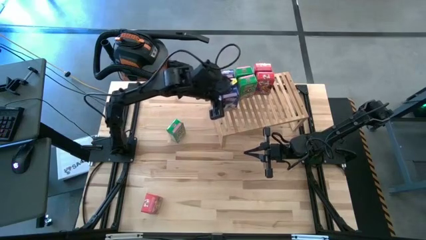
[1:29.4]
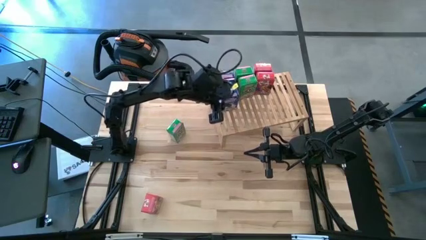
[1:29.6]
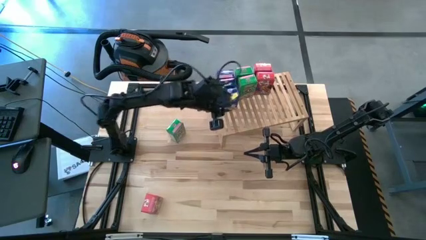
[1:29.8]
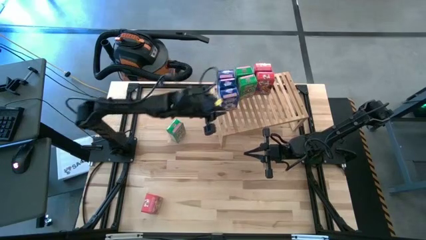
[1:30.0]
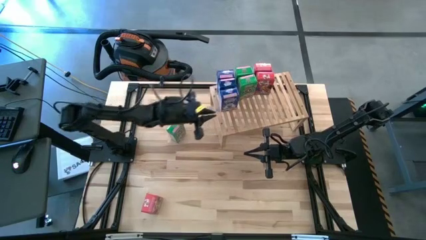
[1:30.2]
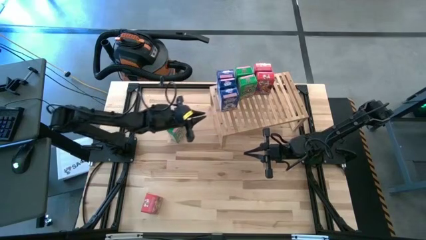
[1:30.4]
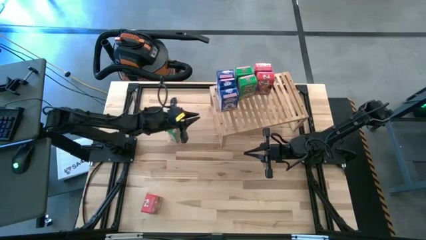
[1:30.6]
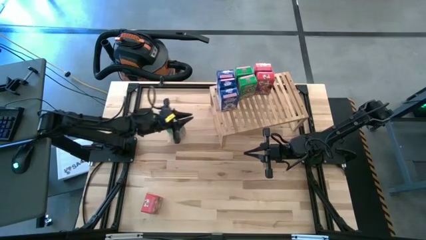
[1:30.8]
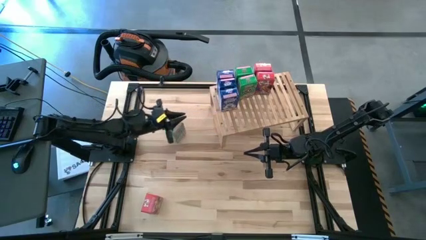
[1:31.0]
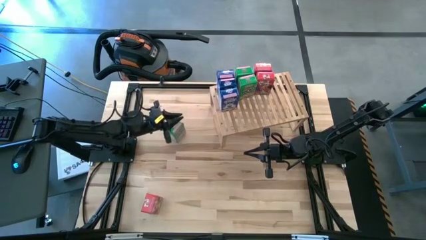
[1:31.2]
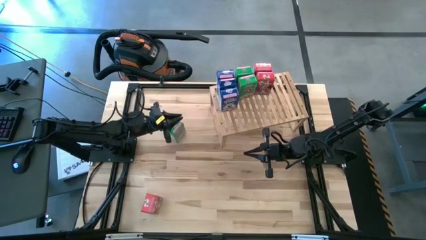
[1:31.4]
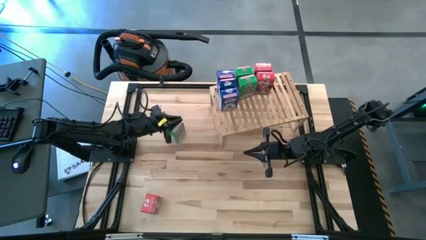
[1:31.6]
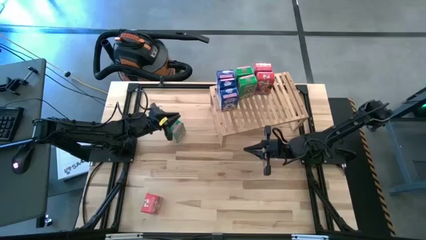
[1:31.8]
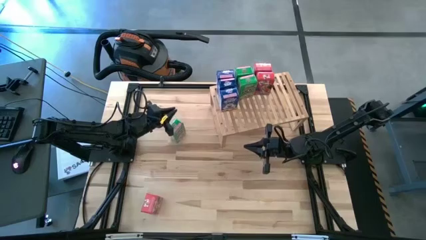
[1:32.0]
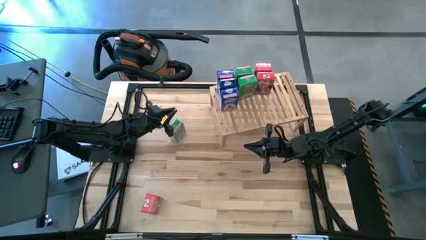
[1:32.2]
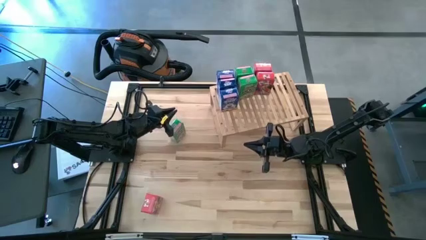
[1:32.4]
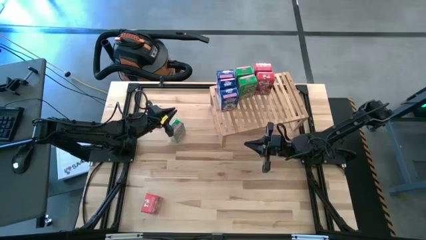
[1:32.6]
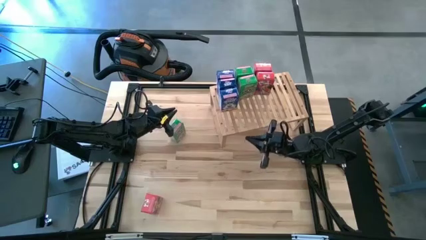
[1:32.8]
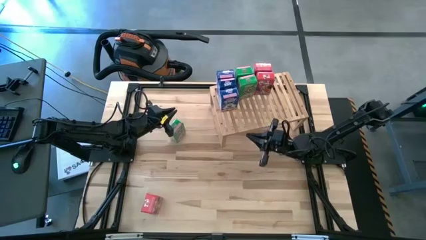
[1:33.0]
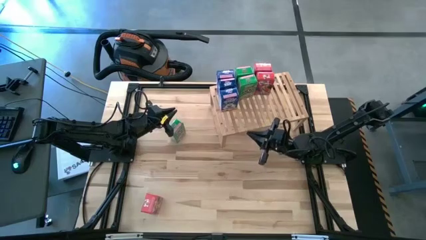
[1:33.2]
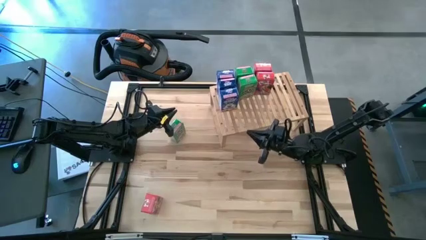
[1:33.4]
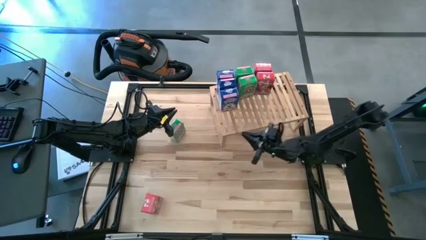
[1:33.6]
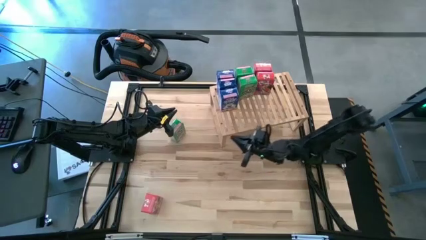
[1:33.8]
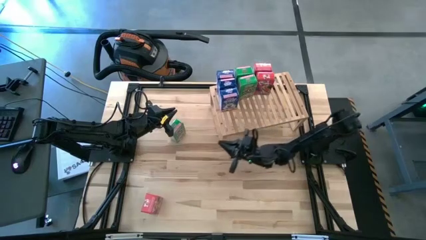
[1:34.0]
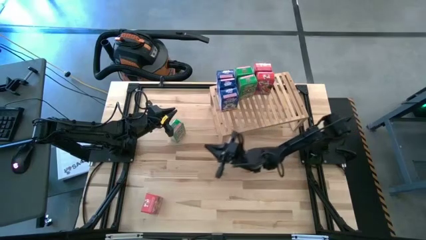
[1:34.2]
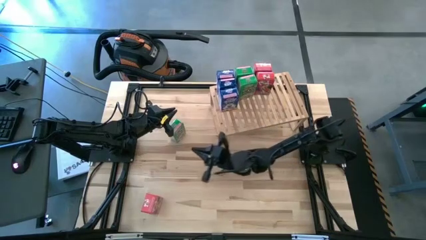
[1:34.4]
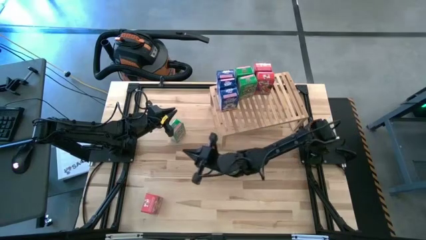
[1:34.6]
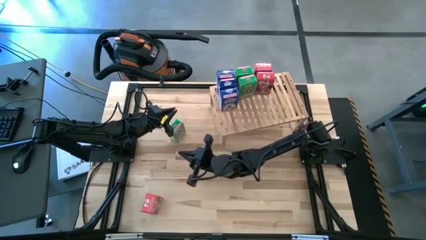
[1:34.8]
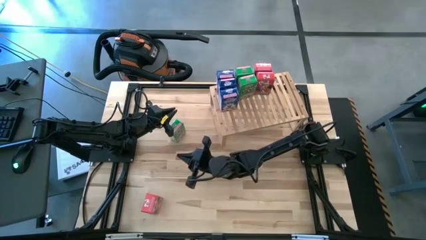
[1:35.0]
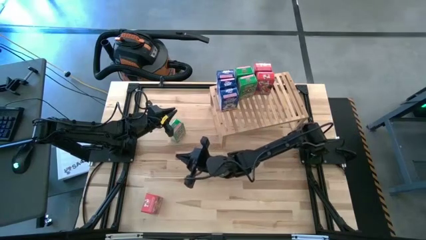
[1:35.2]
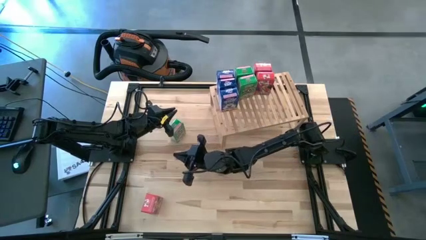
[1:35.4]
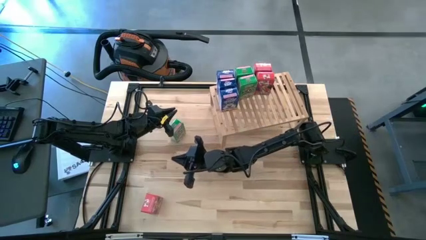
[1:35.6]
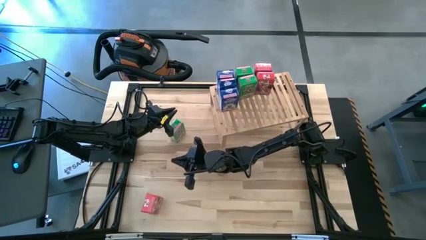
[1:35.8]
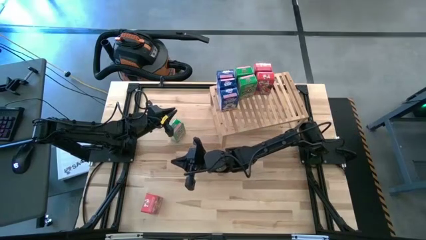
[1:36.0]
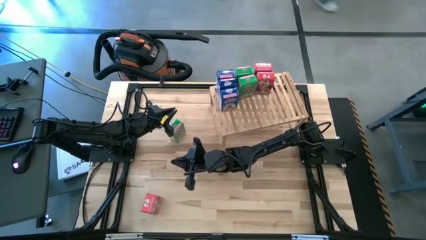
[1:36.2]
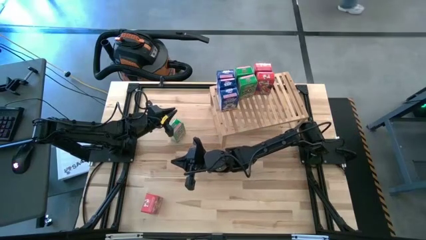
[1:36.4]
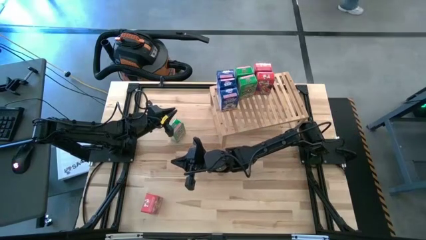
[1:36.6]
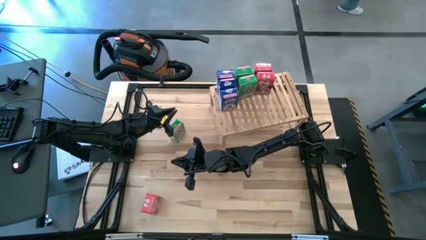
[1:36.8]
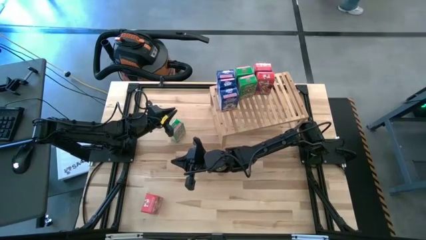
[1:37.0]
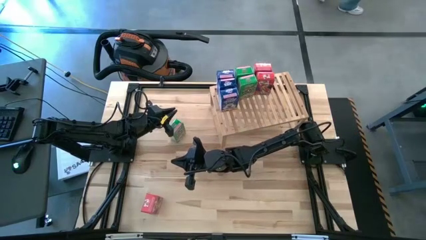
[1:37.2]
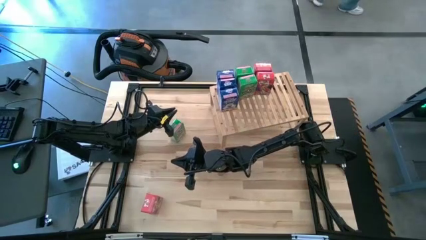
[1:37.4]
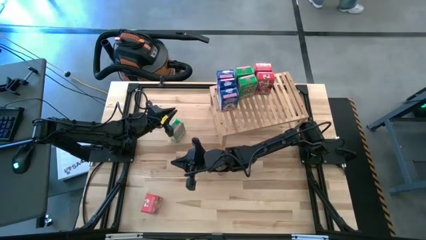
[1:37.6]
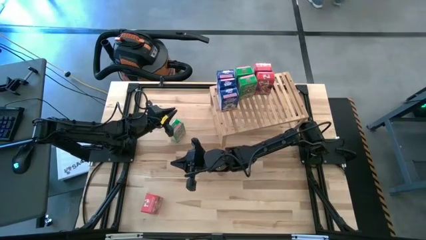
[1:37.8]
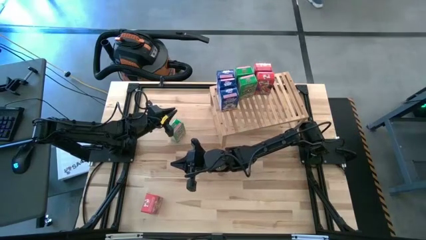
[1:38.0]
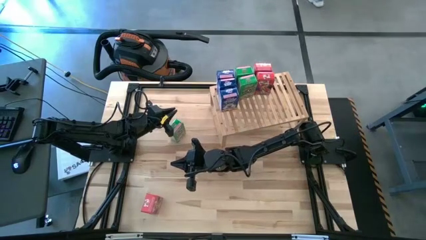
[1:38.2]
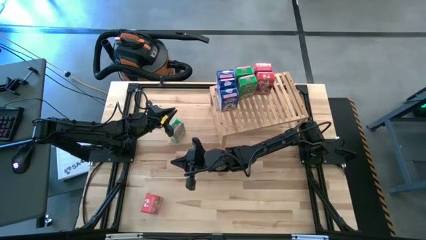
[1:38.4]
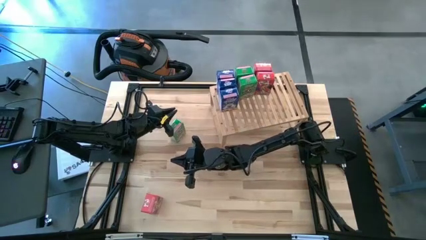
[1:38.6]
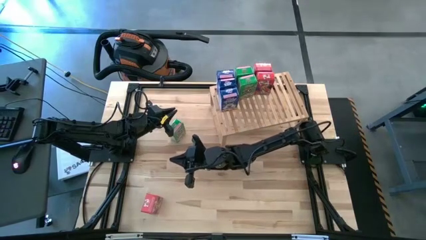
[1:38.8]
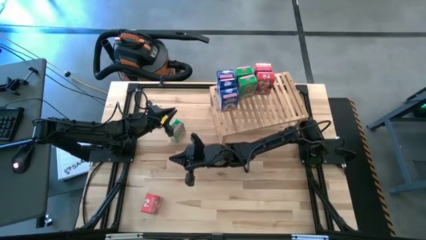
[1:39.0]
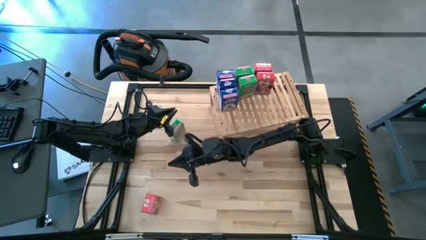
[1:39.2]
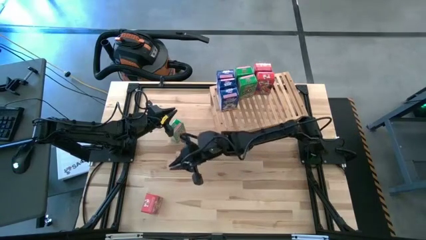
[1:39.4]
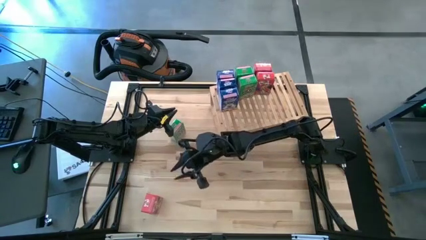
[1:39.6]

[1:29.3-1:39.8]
Task: Stack cereal on shelf
Put the green cereal box on the shelf aligned with the other green cereal boxes

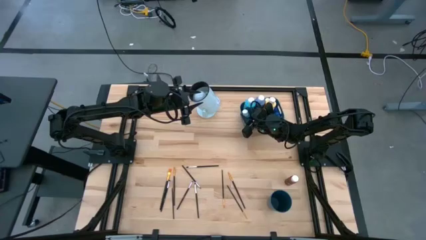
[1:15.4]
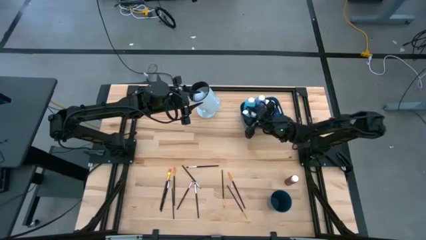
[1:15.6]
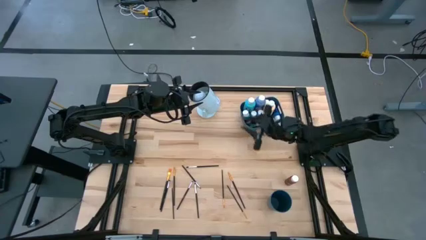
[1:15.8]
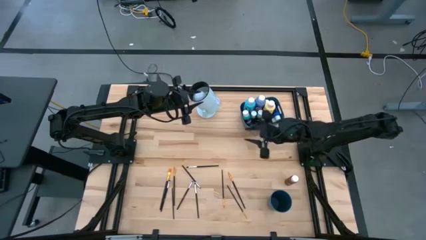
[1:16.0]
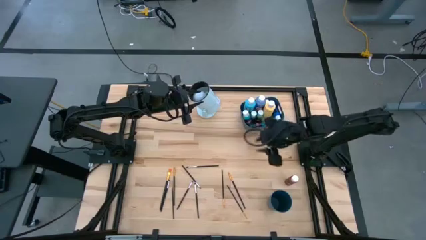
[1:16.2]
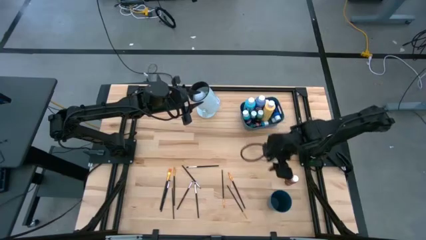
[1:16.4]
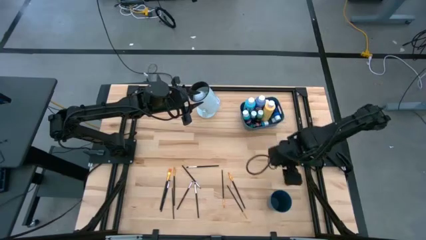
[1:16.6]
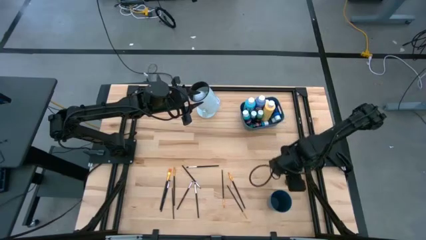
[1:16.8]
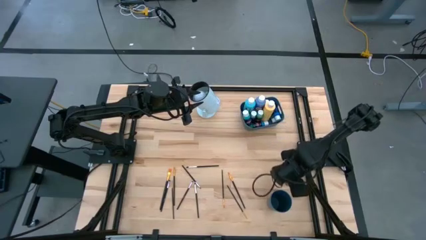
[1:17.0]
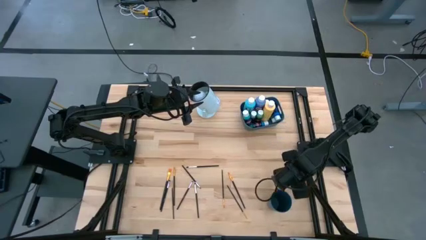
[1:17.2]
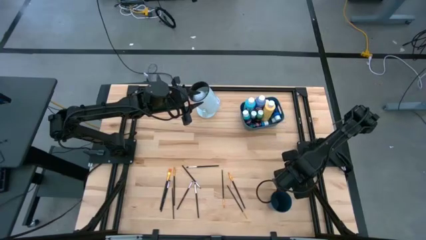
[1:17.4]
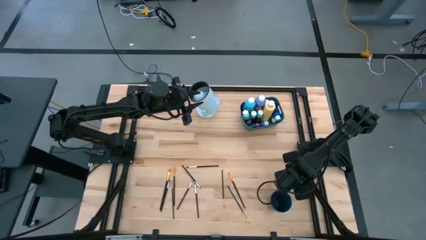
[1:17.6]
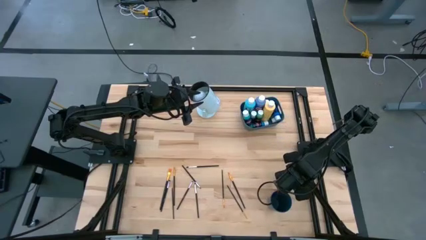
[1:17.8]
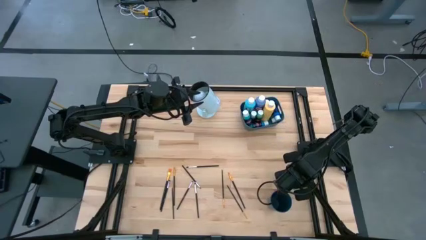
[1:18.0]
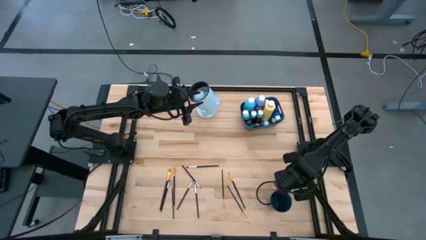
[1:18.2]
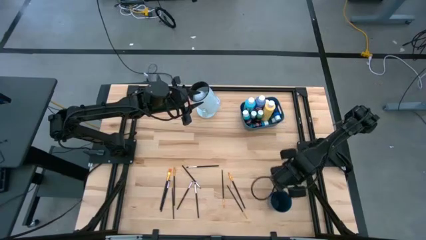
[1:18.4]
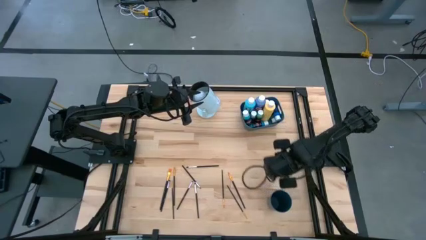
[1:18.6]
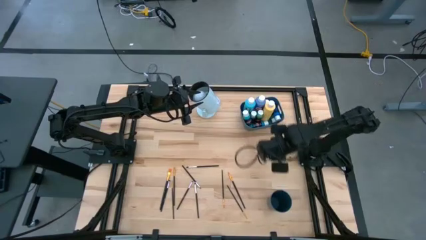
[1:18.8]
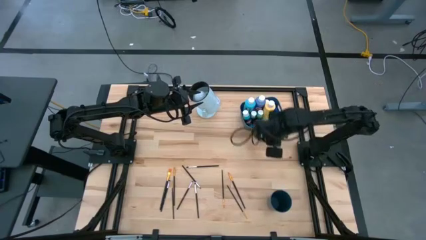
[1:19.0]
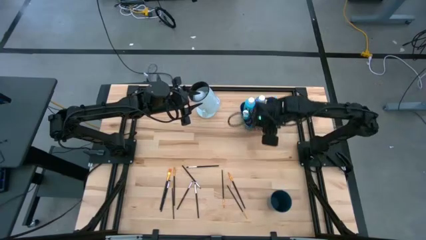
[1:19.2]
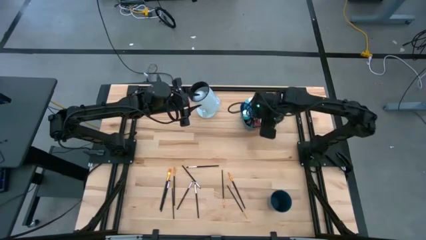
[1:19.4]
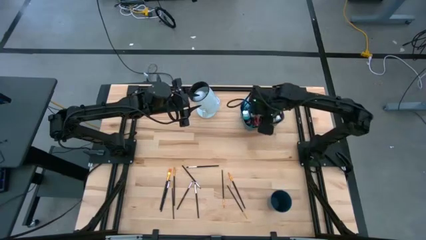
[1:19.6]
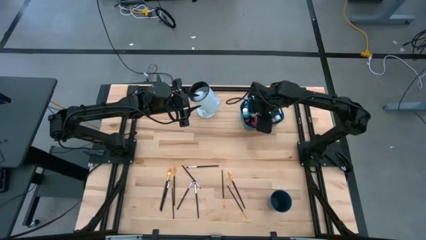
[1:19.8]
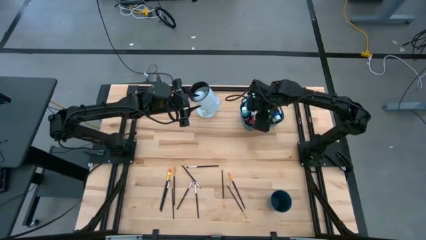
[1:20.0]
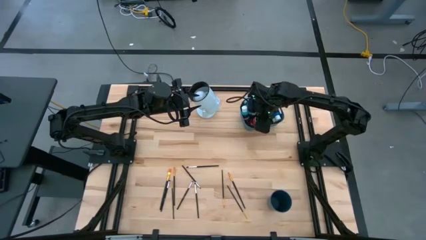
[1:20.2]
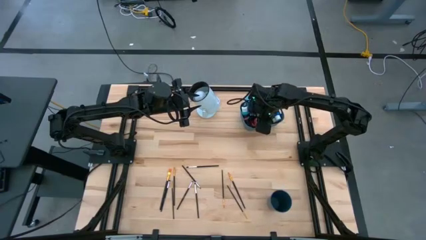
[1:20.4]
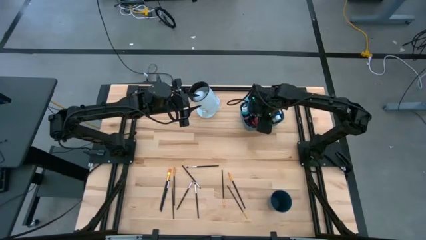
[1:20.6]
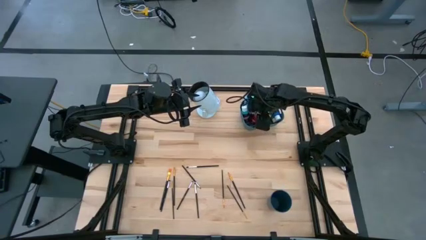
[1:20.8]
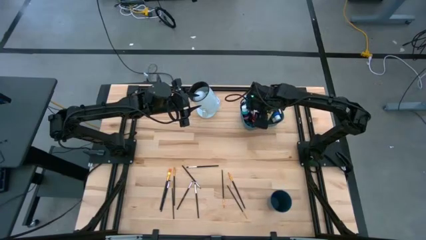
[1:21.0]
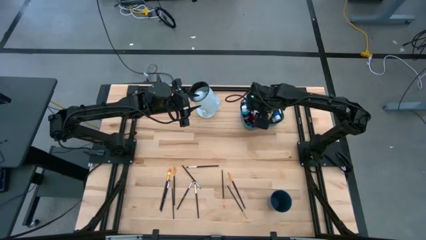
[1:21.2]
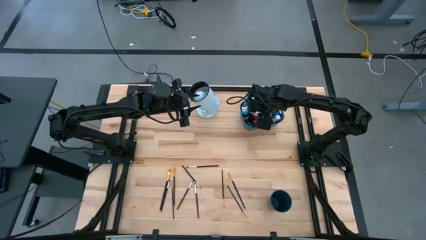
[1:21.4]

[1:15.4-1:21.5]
Task: Pick & Place Paint Supplies
Put the red paint bottle into the blue bin
